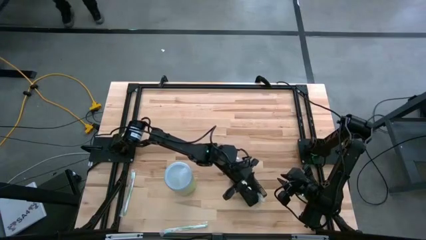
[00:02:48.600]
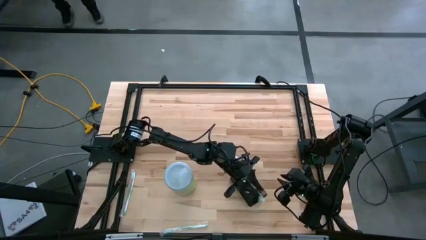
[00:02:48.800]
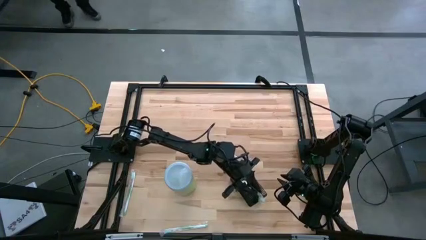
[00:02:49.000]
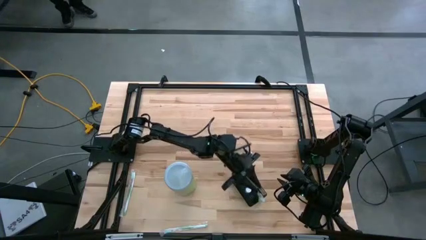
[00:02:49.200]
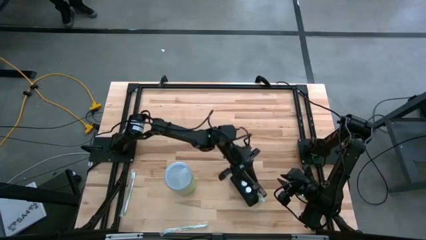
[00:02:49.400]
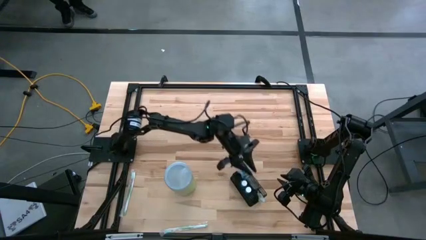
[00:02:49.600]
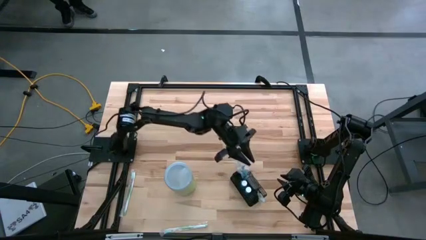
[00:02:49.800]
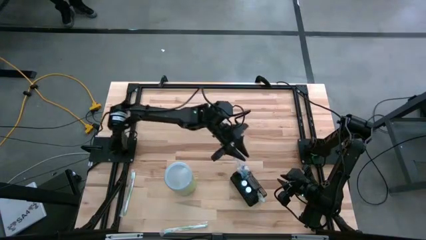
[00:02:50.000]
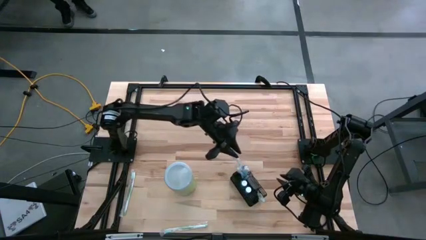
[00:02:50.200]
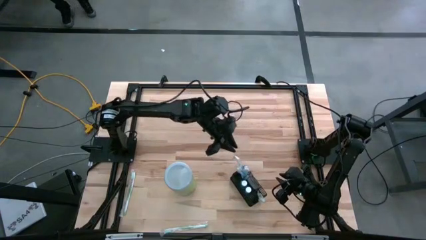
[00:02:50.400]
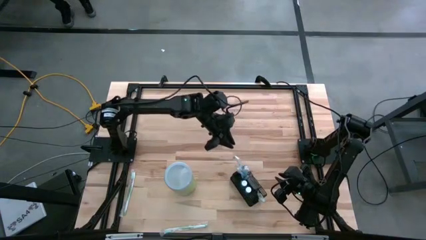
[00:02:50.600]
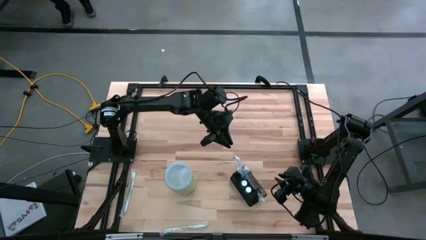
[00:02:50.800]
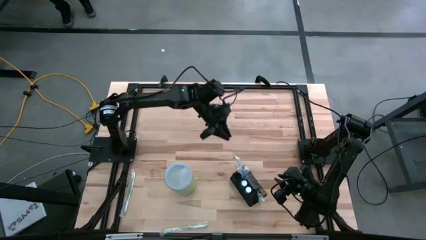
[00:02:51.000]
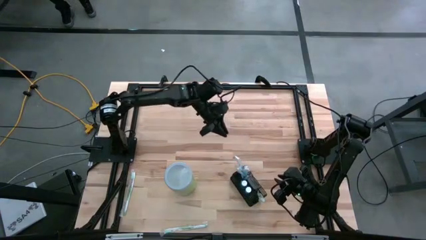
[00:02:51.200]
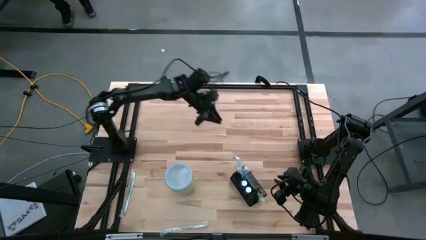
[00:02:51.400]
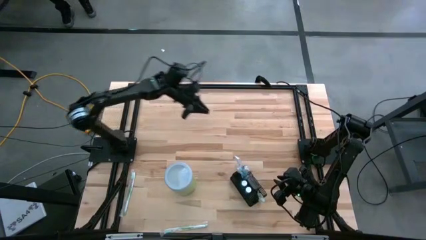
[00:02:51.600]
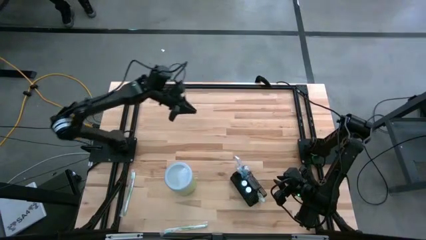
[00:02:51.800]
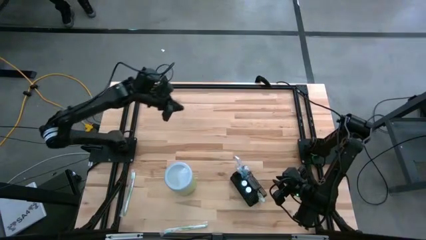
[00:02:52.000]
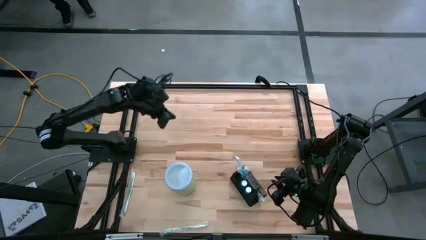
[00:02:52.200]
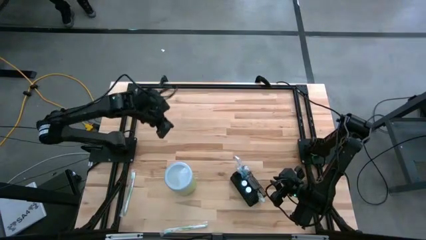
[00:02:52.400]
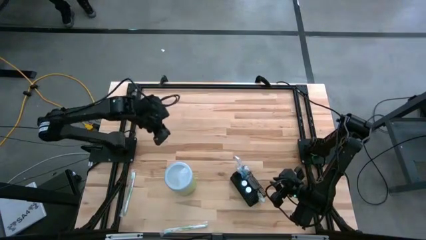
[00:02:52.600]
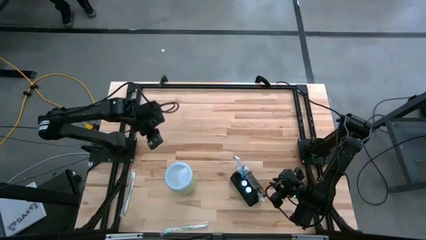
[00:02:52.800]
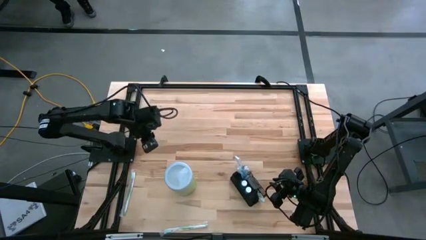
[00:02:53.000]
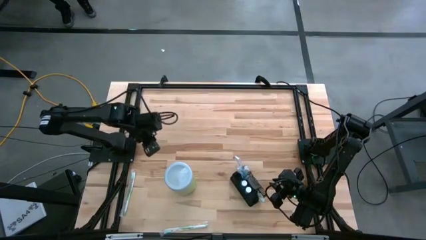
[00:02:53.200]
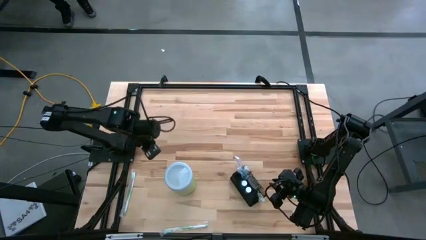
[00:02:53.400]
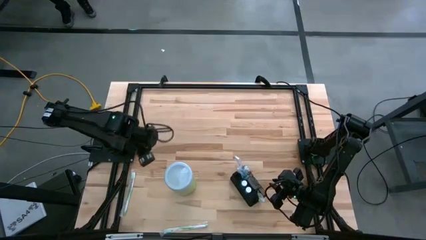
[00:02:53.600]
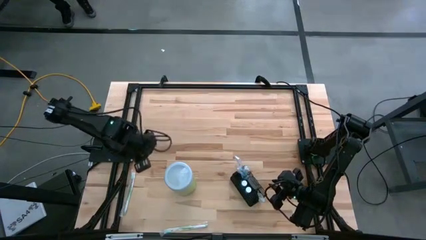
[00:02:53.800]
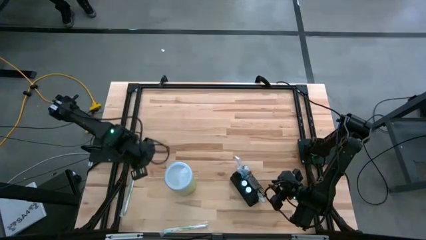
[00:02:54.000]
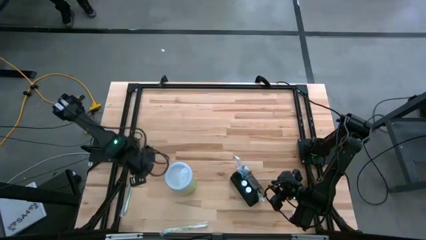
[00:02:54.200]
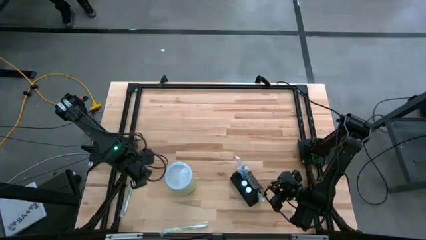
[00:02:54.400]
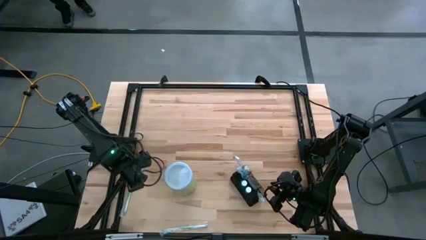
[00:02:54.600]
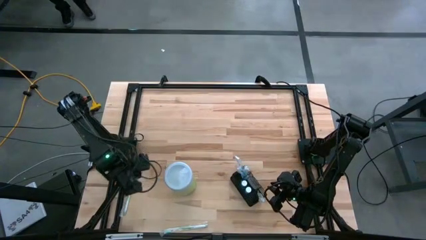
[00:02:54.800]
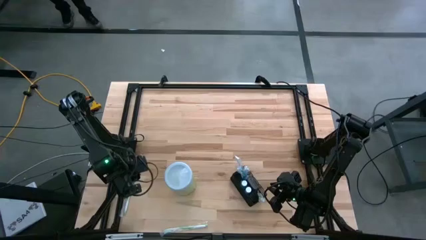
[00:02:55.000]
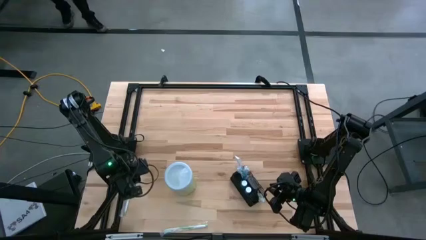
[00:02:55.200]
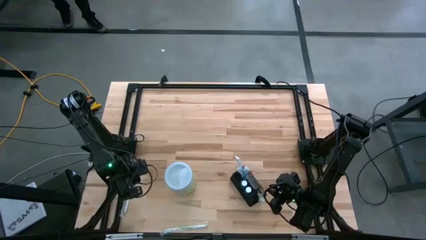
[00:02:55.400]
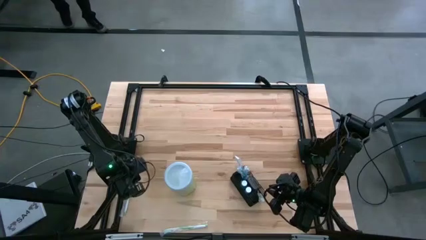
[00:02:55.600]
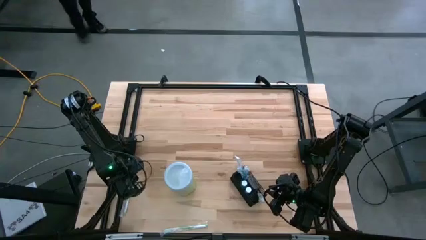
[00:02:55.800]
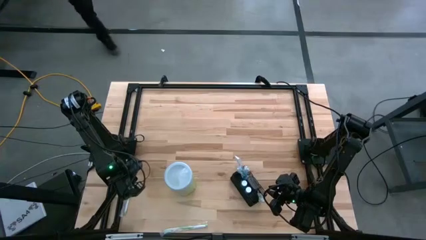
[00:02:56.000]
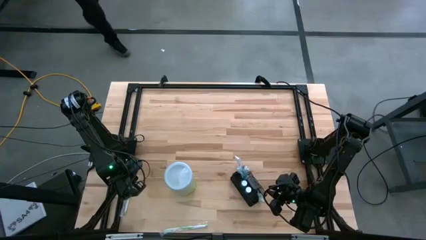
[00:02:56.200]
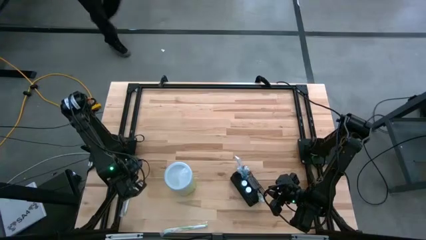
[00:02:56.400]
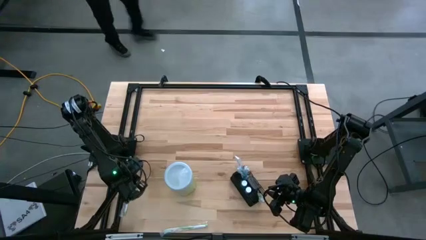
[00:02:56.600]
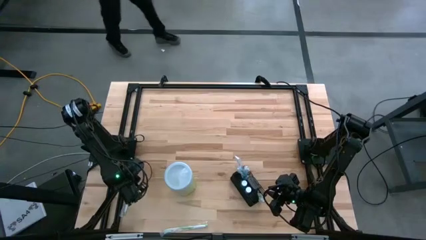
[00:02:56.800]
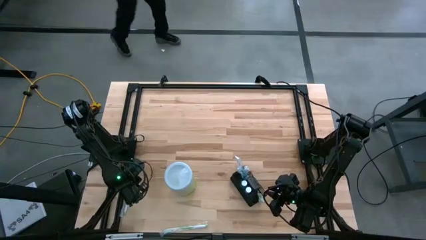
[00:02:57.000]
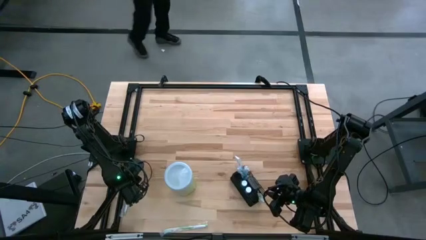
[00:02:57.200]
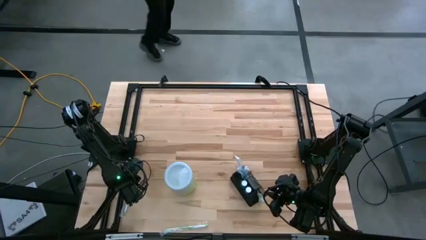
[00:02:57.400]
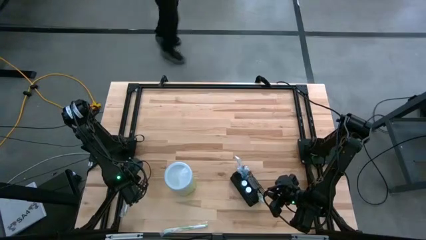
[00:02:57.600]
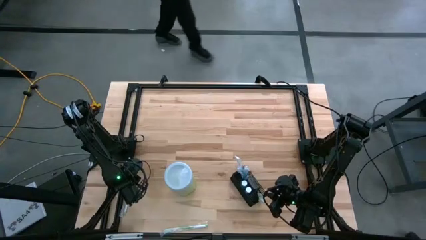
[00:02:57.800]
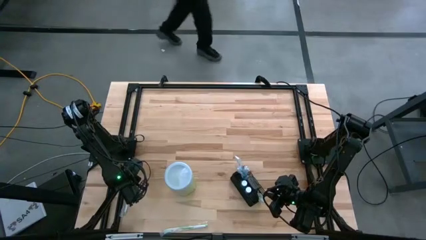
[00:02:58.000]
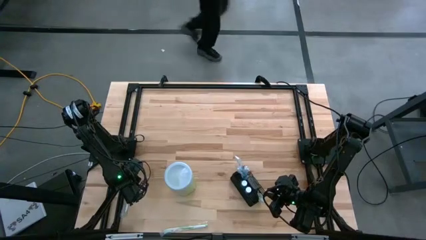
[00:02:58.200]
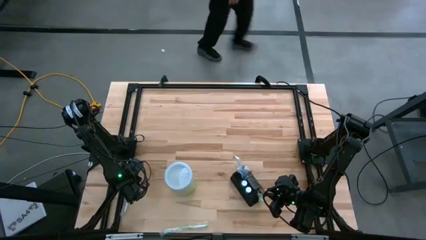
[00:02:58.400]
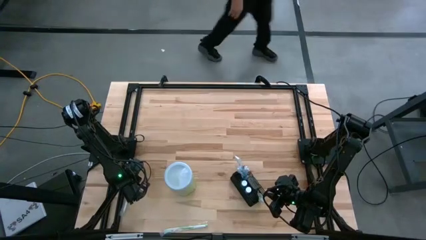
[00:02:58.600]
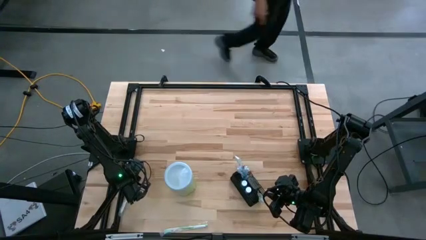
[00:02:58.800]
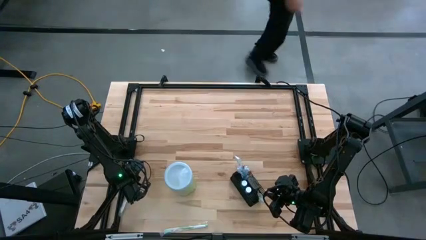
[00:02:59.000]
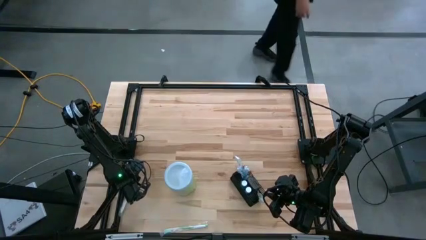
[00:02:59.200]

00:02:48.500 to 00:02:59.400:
Task: Pick & Place toothbrushing station
Put the top green toothbrush into the black mesh organizer

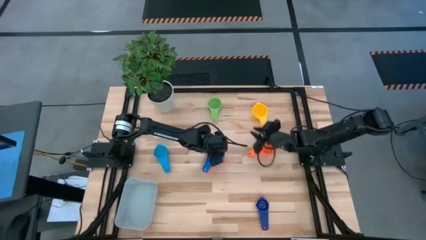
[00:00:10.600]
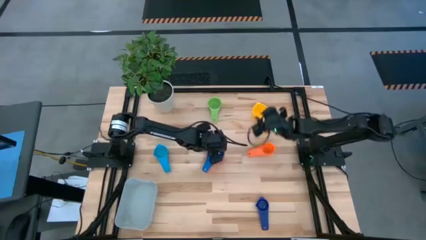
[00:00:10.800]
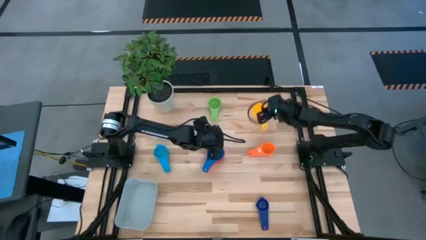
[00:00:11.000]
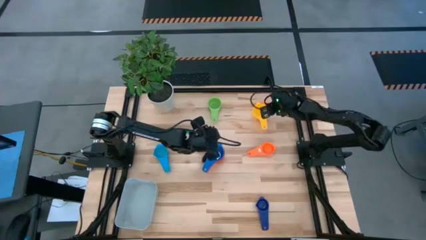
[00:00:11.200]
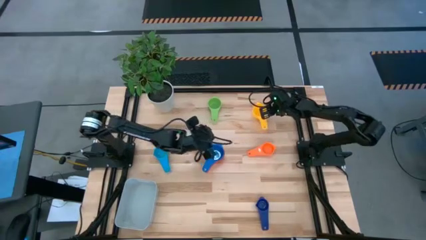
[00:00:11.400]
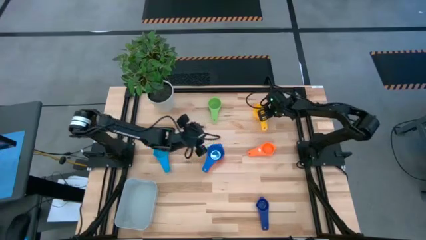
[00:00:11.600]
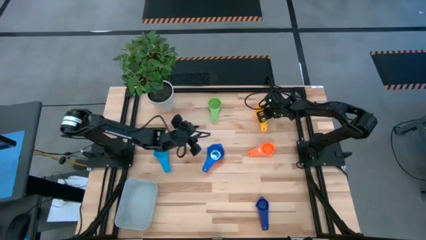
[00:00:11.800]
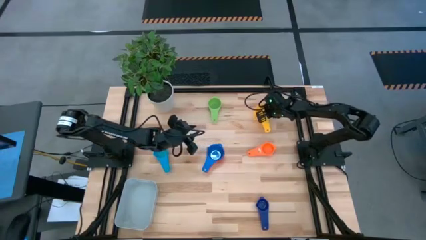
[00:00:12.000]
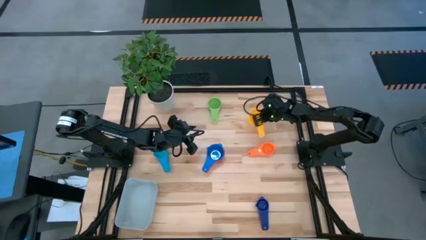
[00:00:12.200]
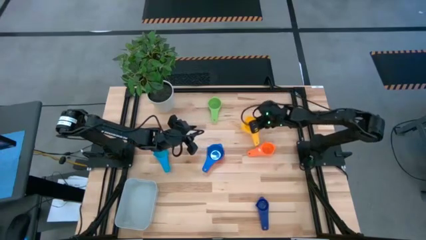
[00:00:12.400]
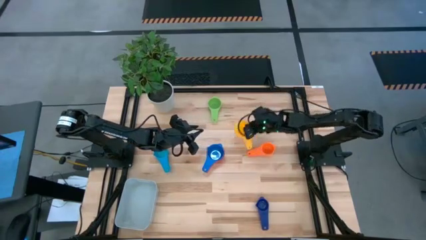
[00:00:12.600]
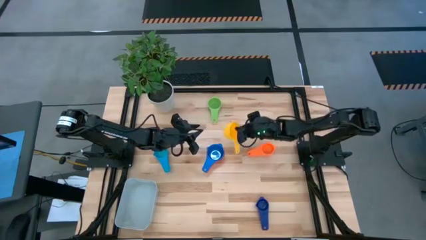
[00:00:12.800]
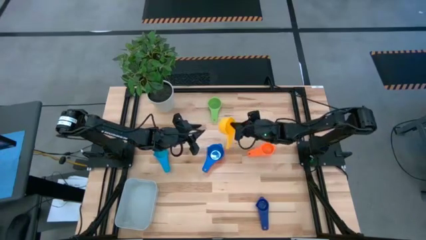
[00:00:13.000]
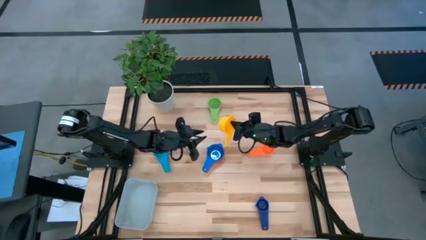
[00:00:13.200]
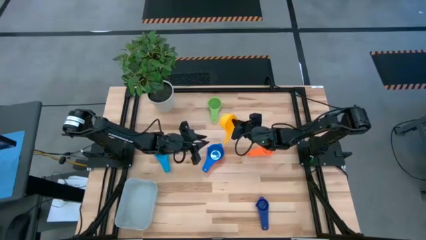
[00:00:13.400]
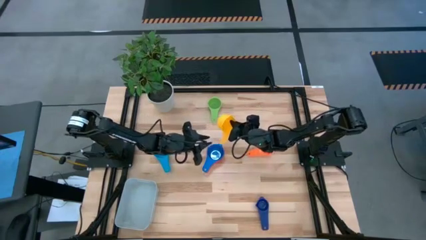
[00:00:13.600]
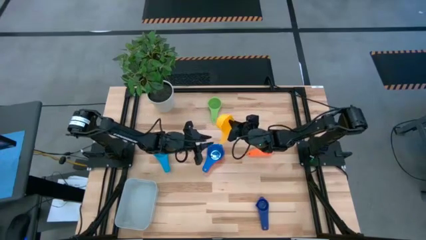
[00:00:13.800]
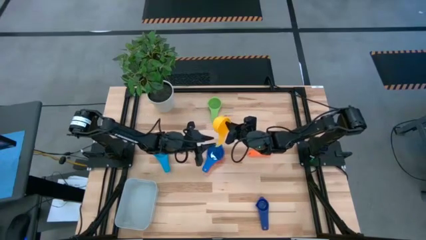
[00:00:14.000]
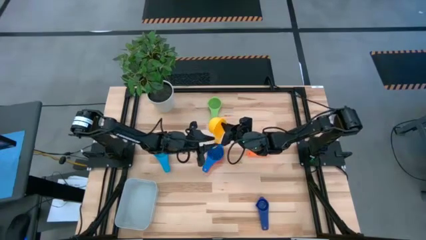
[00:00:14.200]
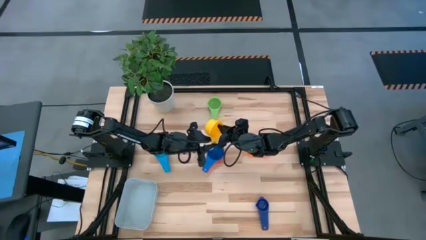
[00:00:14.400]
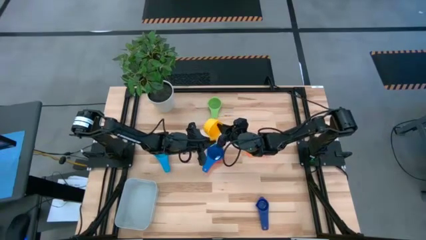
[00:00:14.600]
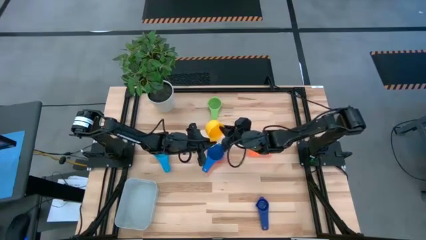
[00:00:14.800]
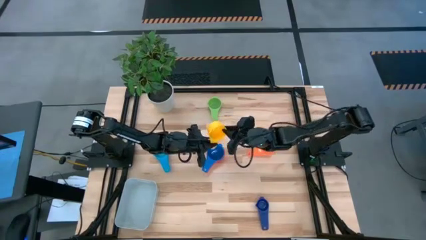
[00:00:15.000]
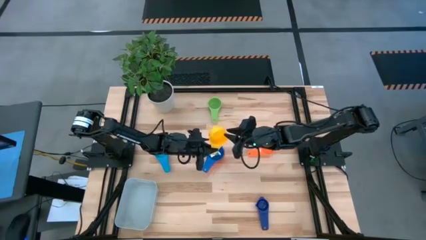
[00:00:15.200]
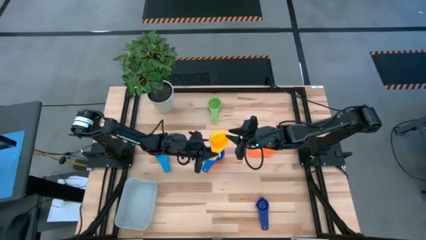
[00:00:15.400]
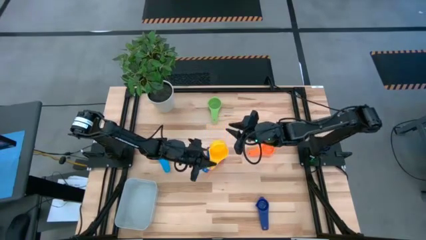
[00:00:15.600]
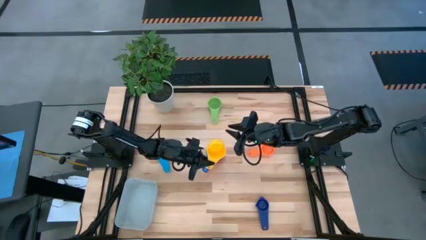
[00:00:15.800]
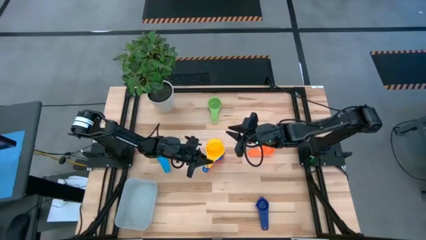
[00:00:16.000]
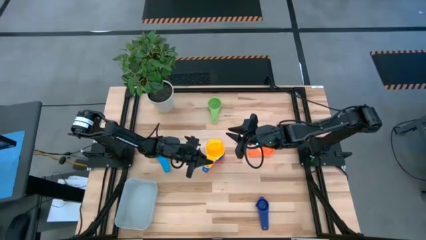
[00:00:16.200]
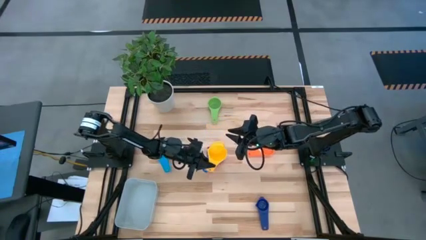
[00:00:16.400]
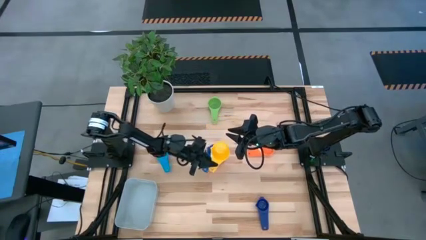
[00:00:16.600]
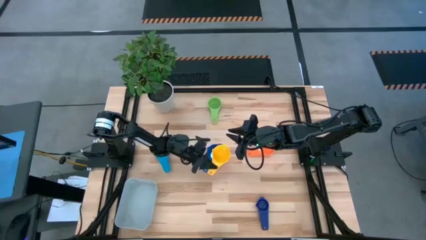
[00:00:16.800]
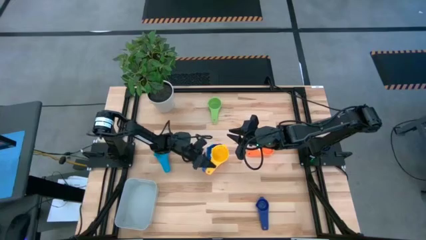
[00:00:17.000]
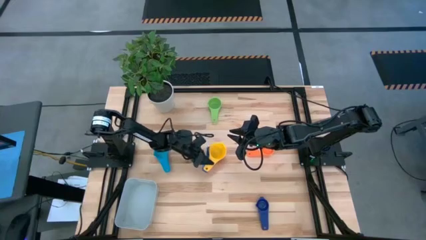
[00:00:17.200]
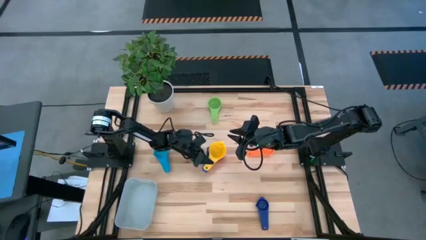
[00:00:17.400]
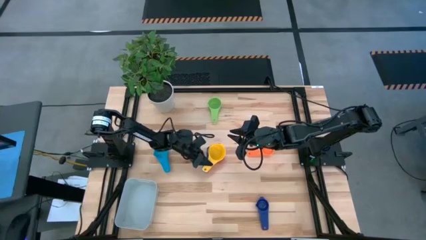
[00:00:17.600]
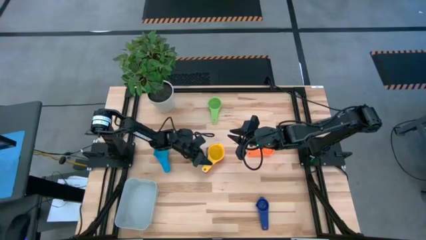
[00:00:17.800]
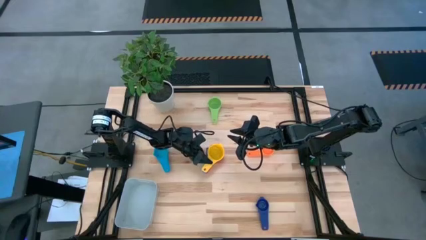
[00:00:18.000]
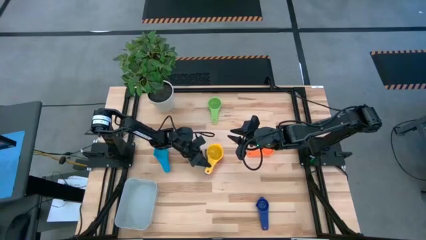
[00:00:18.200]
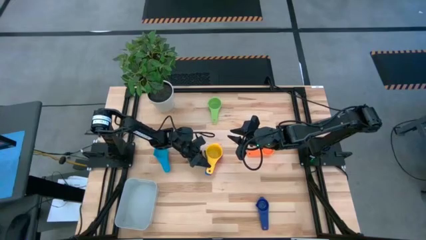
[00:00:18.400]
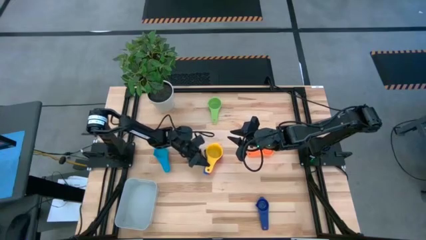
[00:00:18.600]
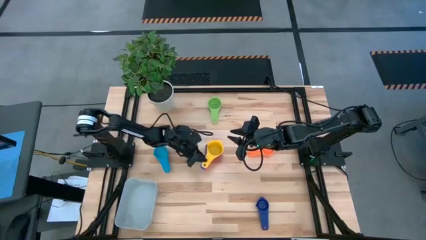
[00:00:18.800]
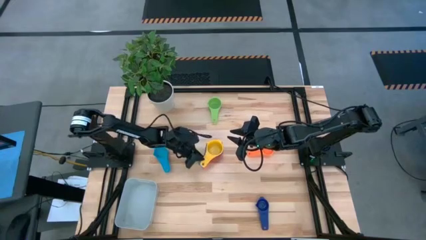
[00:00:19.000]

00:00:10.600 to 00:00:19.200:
Task: Nest measuring cups in basket
Stack the yellow measuring cup on the blue measuring cup
